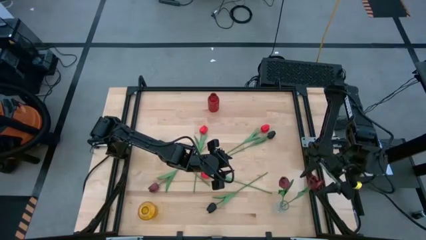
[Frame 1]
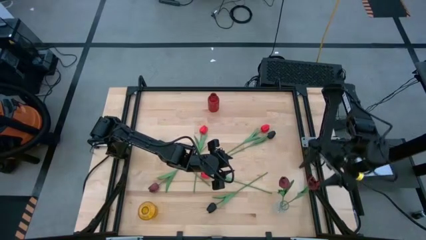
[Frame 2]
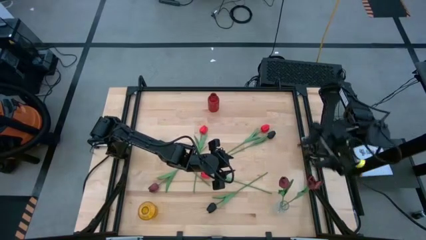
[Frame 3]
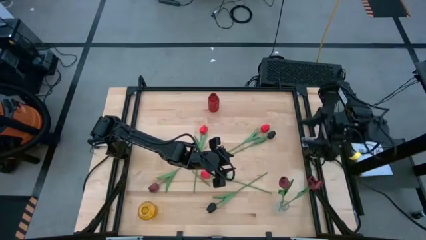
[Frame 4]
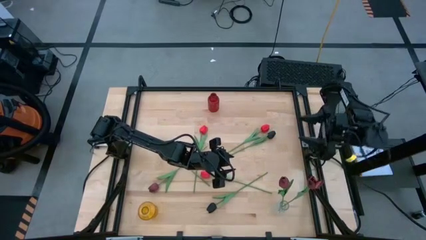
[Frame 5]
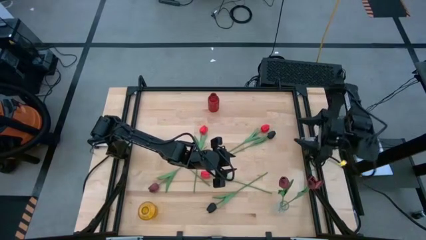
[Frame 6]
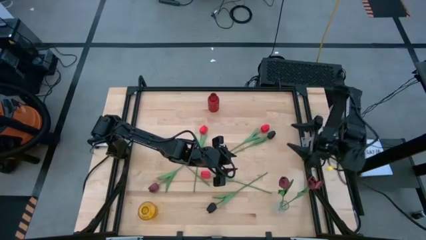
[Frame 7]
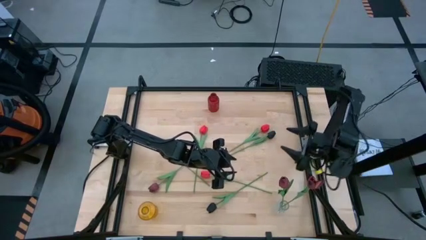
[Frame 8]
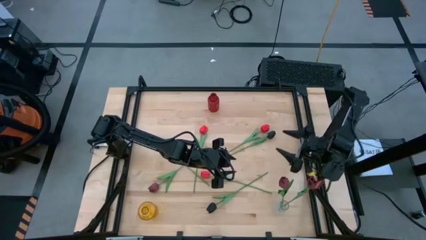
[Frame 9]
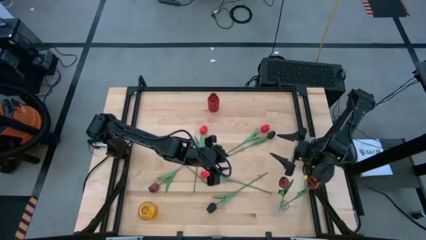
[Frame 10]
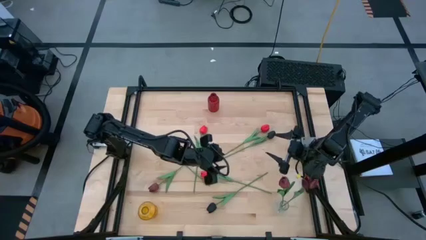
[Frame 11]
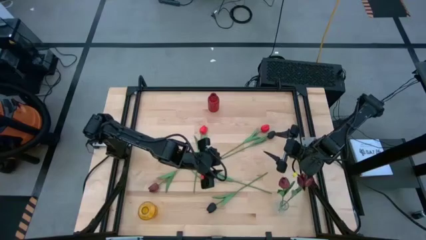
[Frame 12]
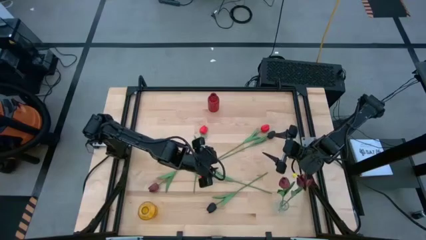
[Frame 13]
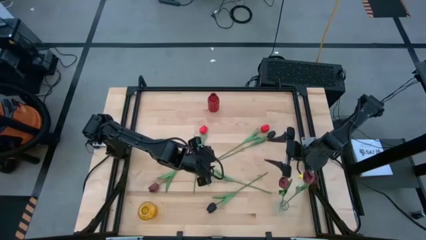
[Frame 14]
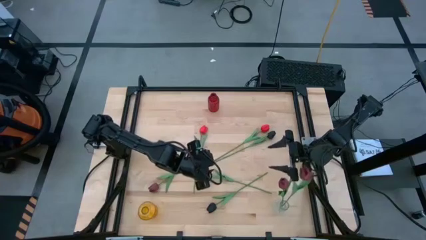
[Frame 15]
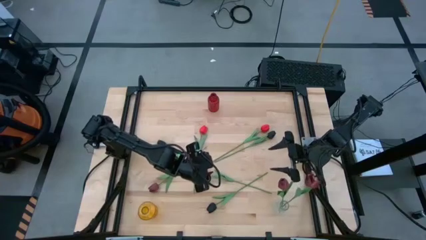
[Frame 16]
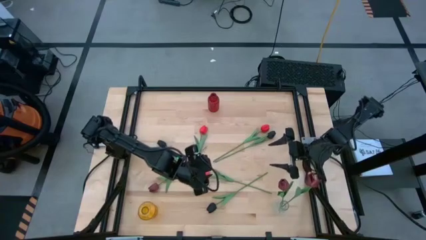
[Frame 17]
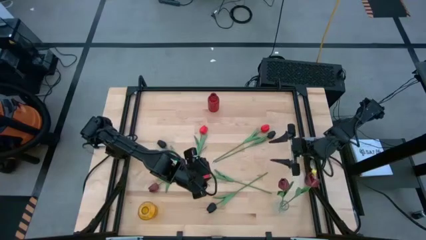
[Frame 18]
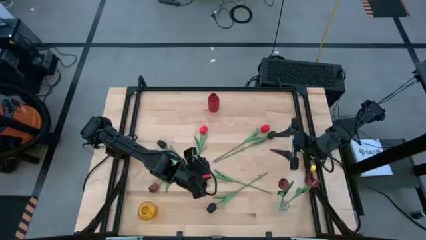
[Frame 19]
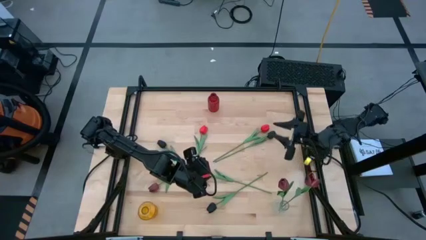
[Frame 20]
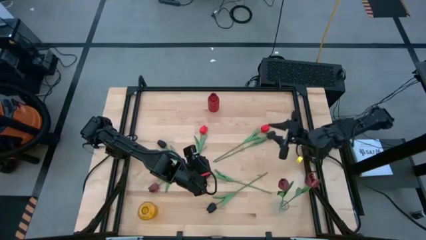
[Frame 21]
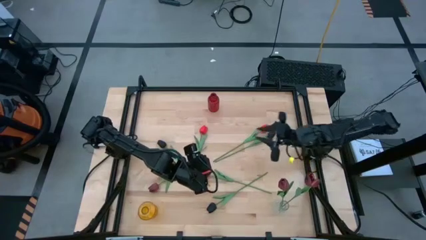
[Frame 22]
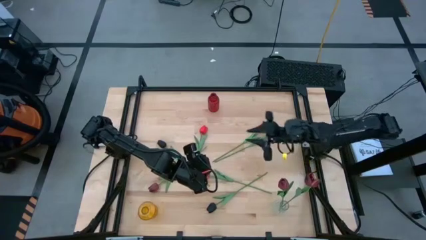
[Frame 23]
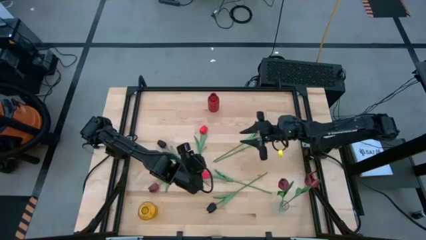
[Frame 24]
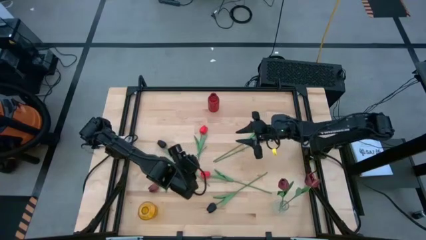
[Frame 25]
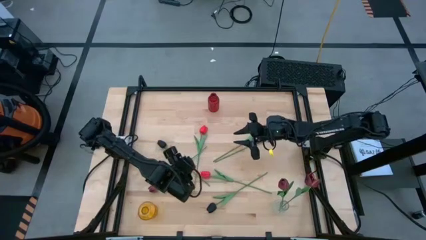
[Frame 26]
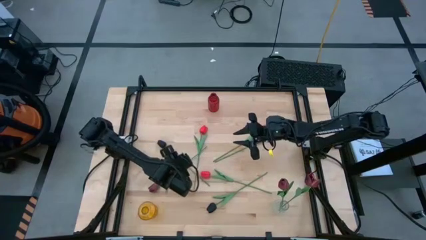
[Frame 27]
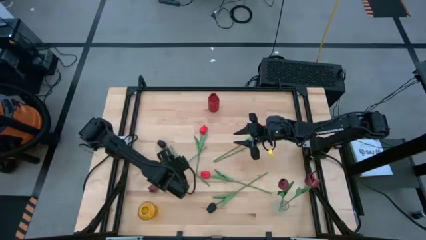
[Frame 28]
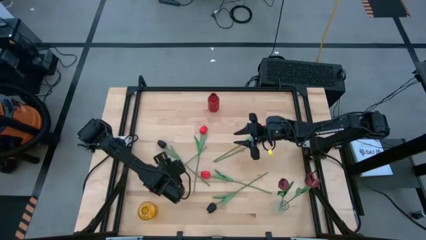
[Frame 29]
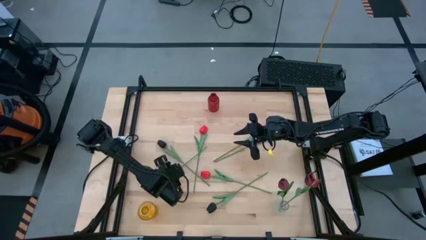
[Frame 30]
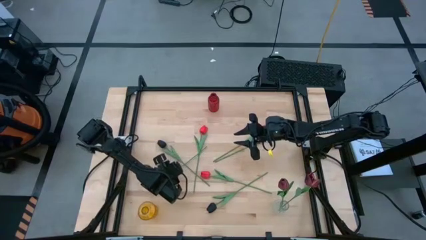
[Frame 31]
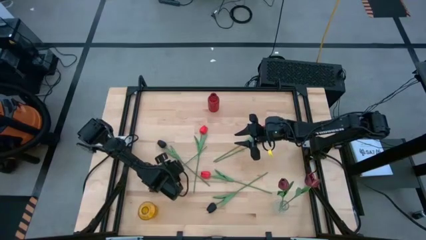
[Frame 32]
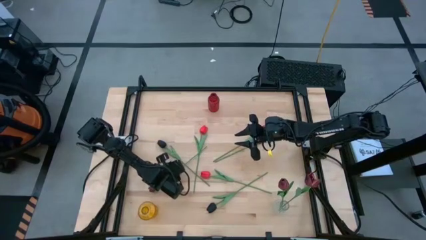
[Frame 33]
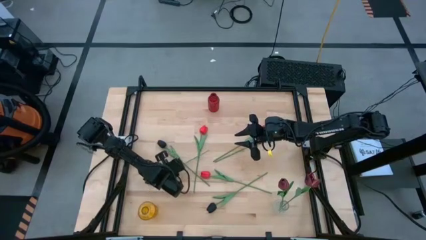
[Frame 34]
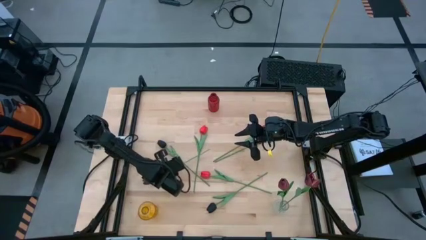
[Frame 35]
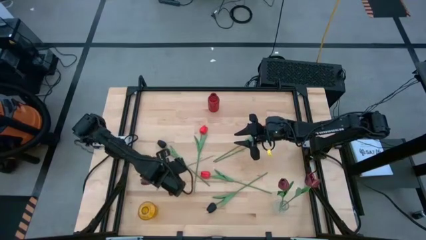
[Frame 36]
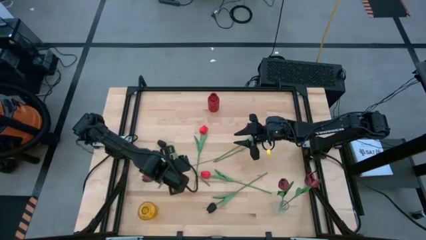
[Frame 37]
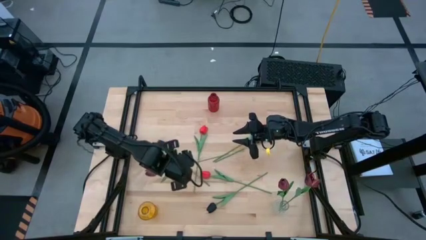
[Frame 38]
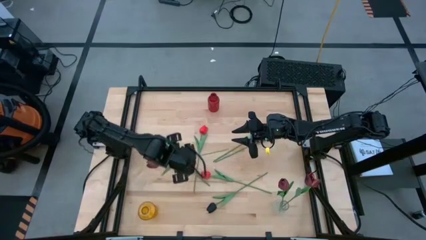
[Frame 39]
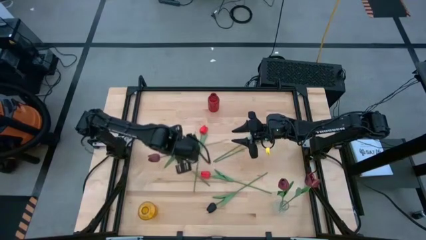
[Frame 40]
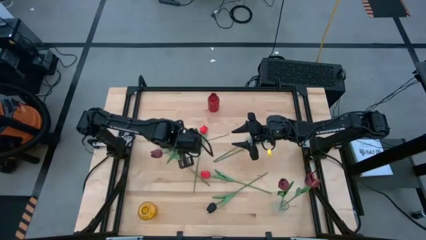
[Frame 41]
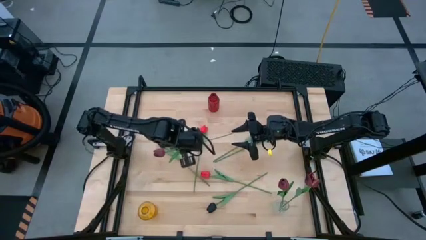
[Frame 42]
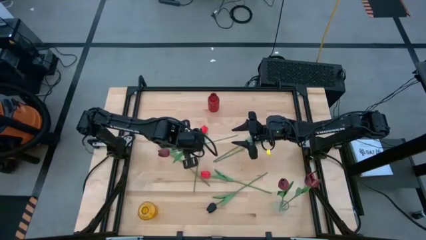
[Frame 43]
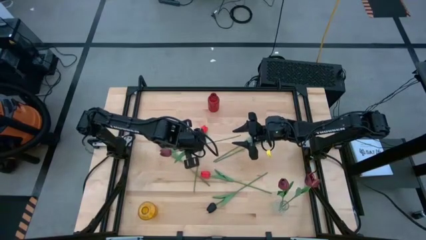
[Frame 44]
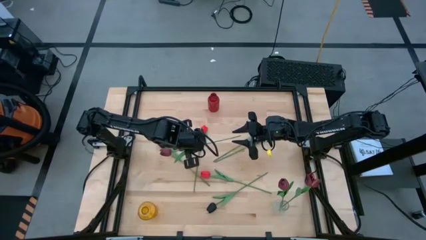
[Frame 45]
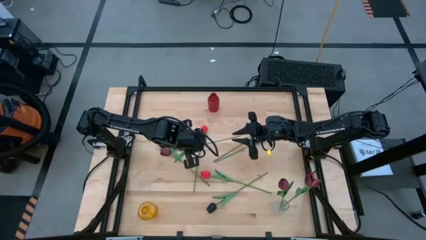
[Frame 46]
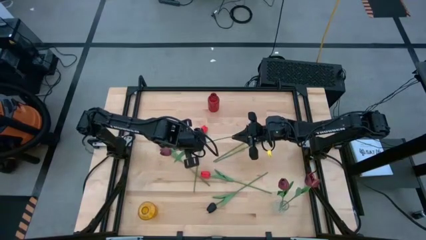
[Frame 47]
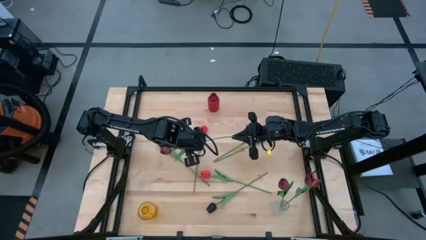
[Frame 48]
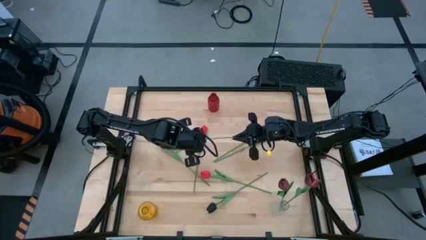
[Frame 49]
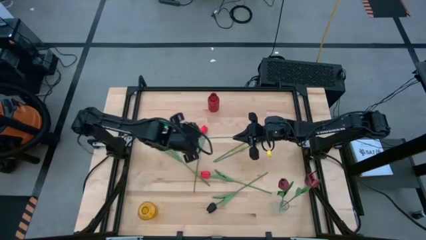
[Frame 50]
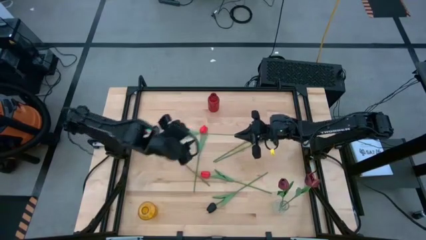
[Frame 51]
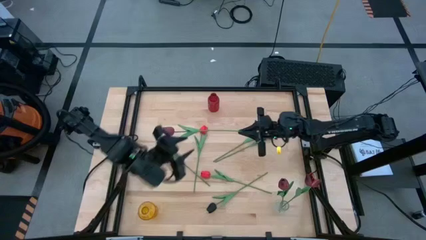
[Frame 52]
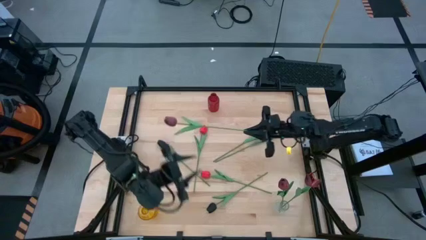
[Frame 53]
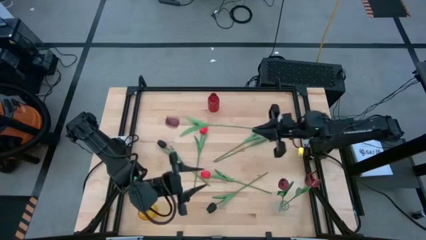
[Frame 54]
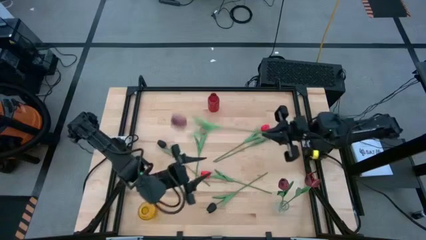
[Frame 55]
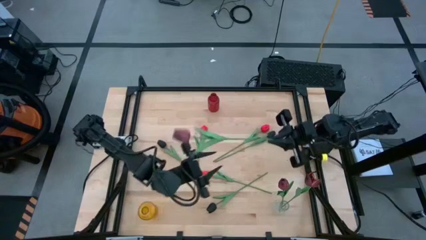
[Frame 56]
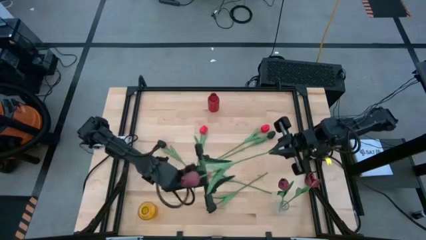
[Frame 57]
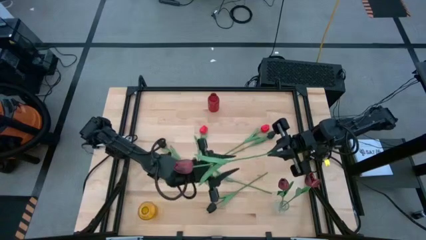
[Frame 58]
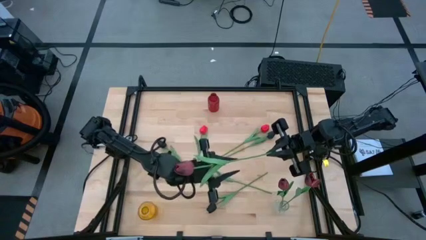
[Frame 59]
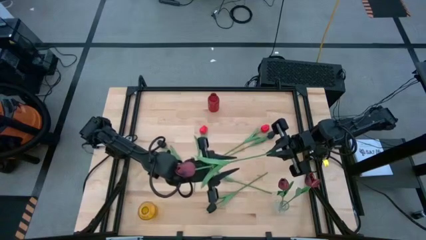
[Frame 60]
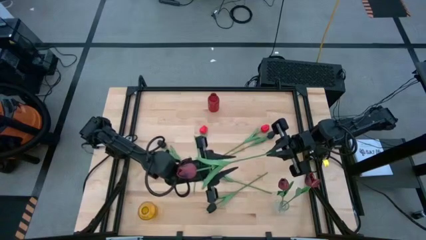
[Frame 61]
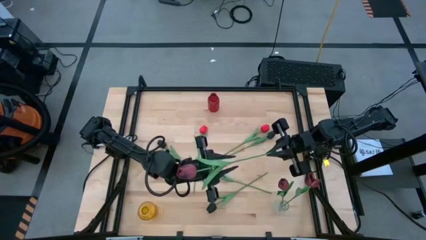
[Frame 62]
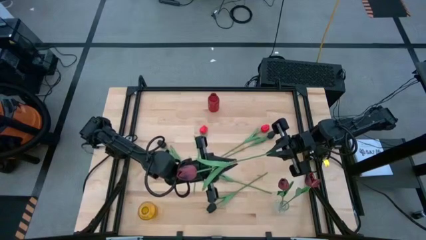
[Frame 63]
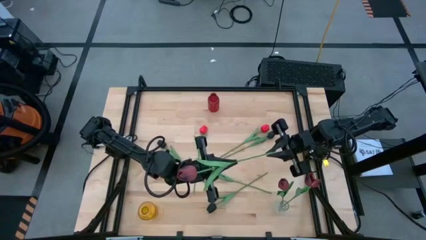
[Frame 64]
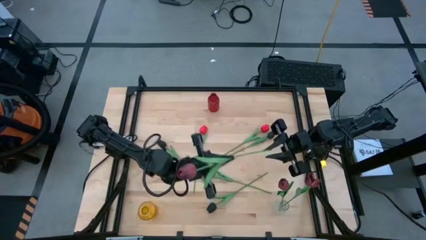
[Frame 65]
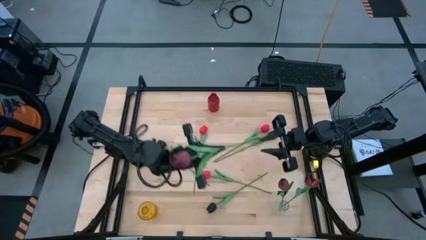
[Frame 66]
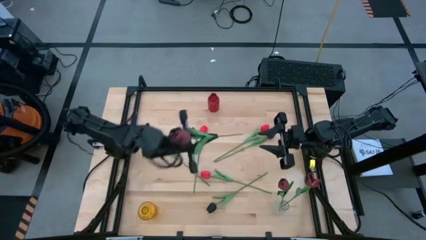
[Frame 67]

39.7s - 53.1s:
Task: Sort flowers into vase by color
Put the dark red flower into the transparent vase

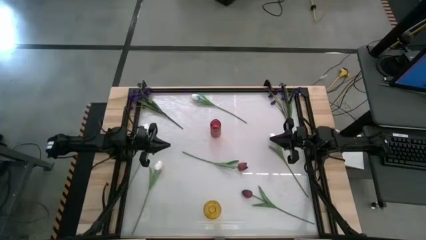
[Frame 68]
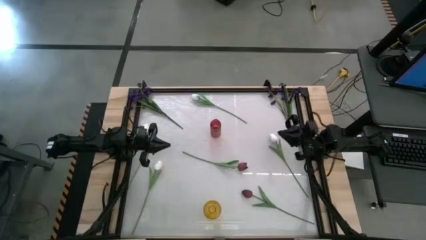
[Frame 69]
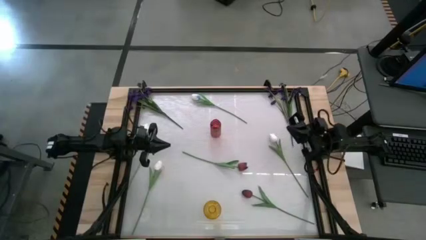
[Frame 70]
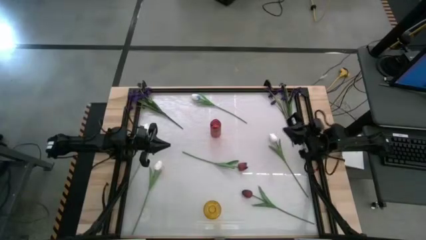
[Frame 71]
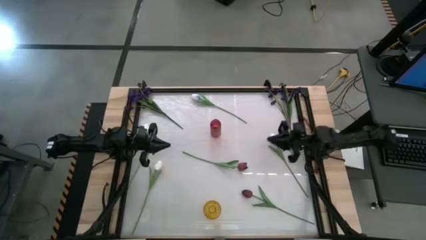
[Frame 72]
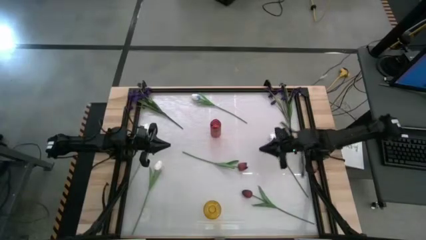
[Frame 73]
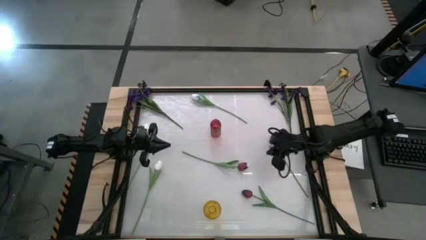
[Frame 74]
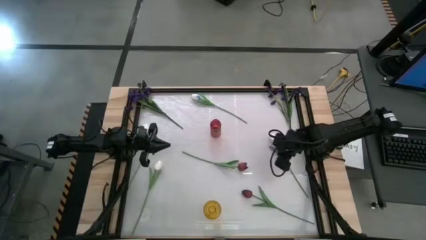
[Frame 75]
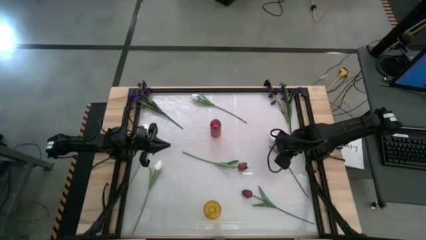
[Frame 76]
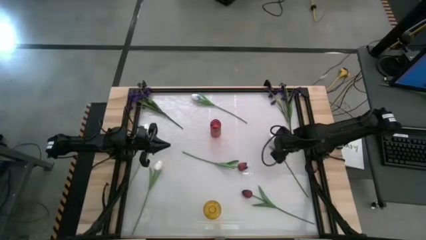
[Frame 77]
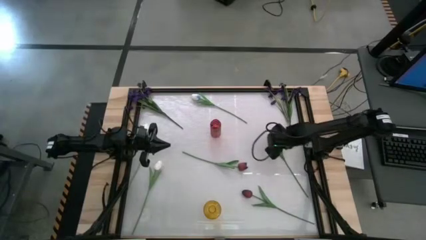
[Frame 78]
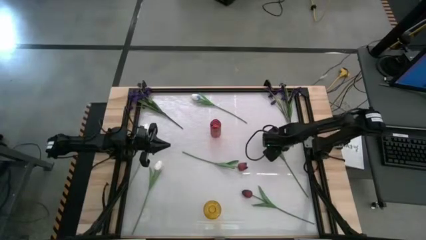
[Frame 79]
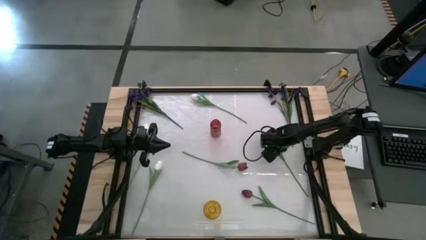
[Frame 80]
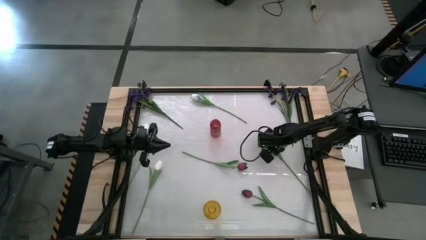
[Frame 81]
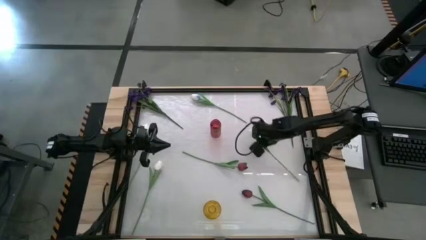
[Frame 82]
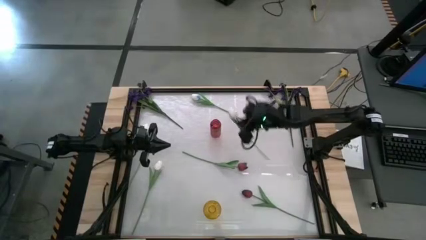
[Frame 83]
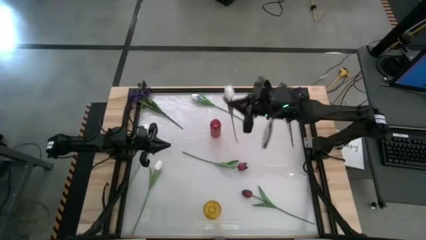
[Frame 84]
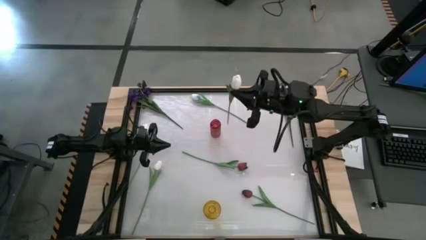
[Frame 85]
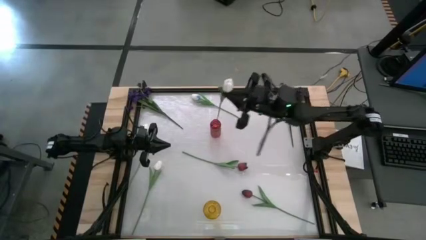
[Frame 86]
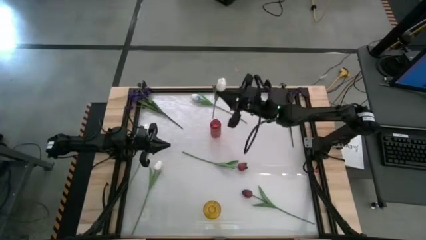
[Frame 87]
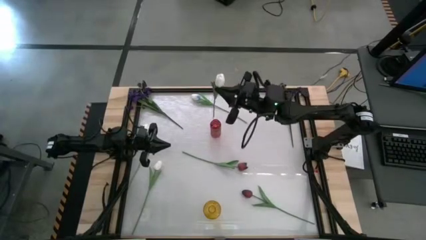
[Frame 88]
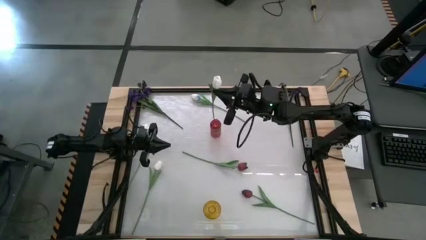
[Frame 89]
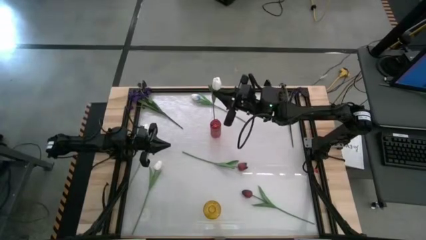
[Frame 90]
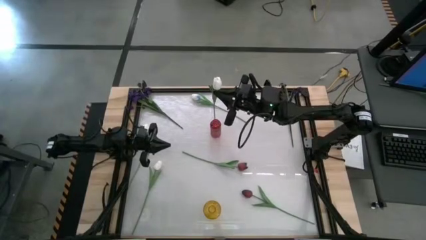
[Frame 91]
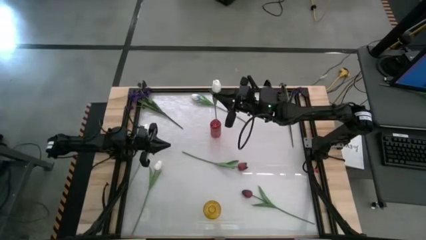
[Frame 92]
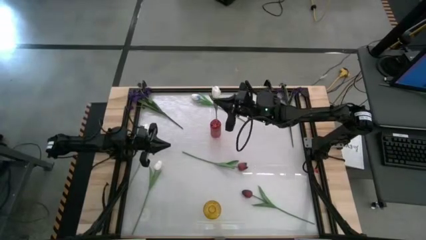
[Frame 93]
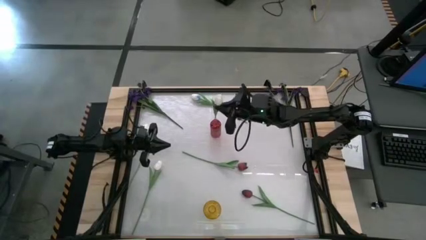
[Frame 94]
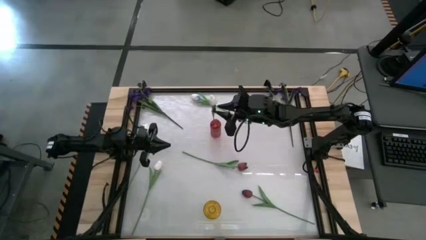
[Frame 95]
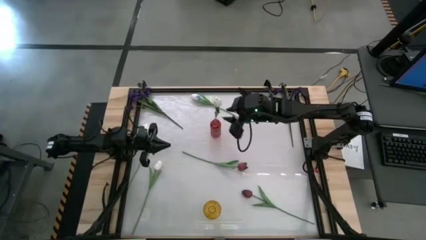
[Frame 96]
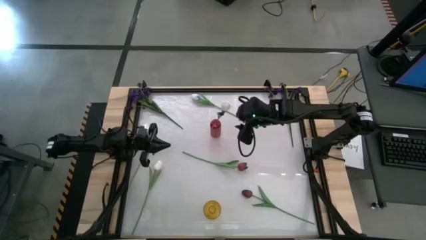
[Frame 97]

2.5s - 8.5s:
Task: Sort flowers into vase by color
Put the middle right white tulip into the red vase
